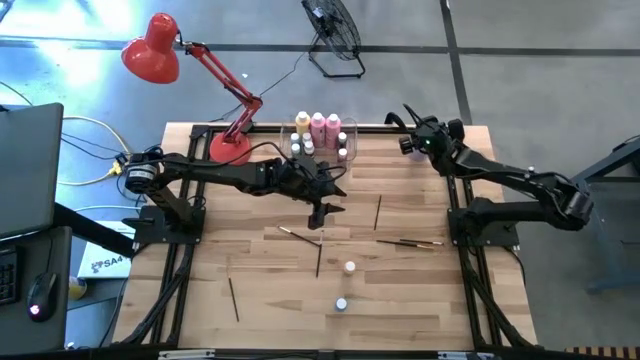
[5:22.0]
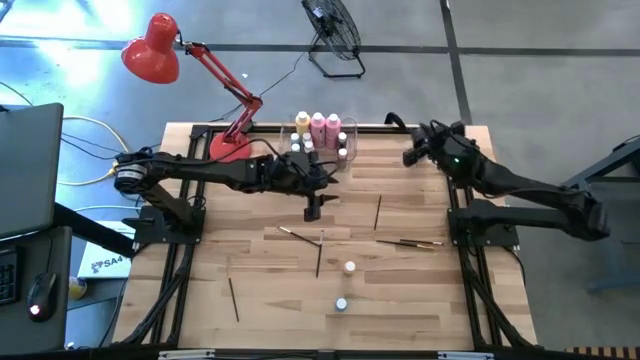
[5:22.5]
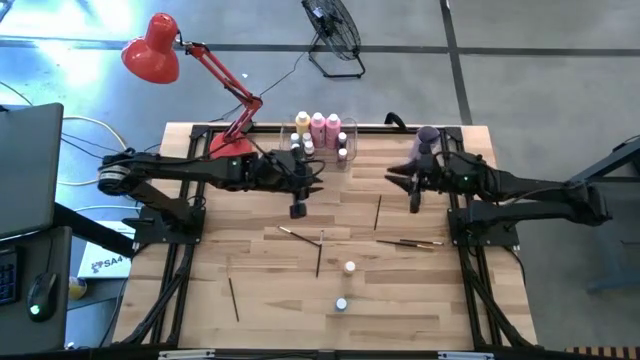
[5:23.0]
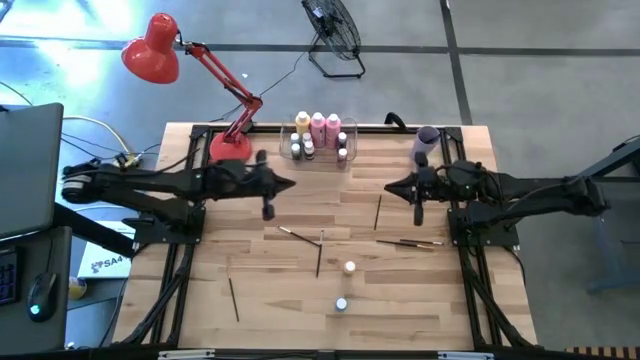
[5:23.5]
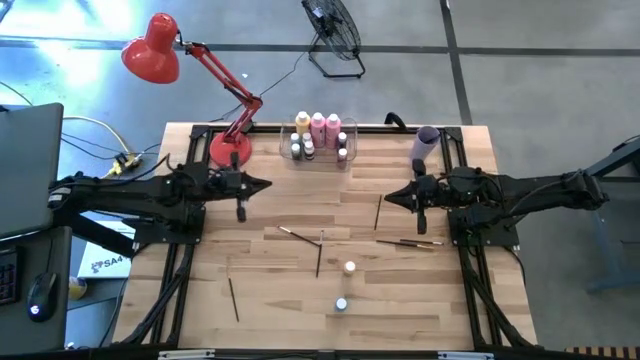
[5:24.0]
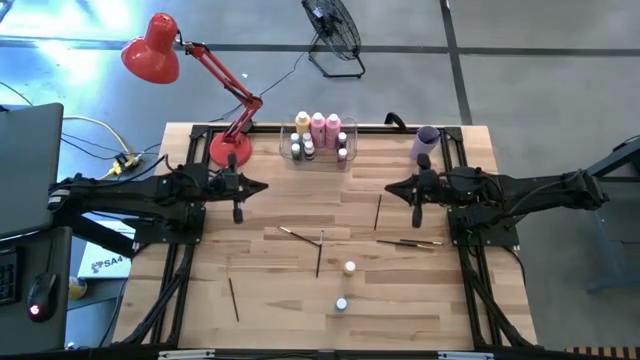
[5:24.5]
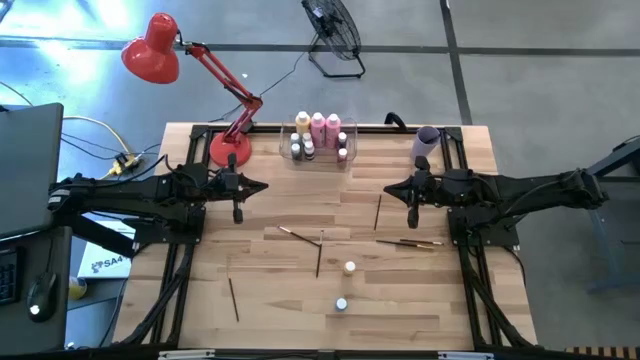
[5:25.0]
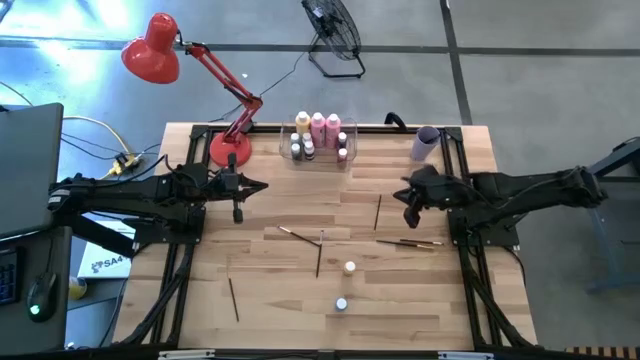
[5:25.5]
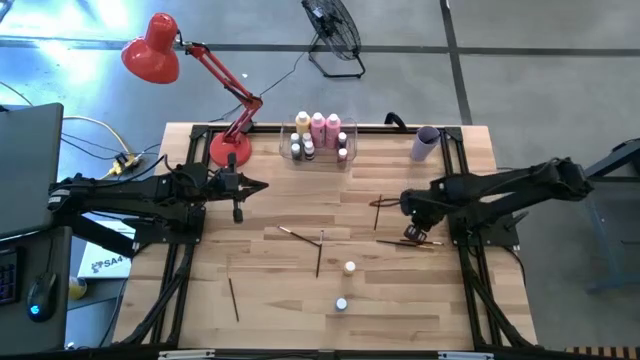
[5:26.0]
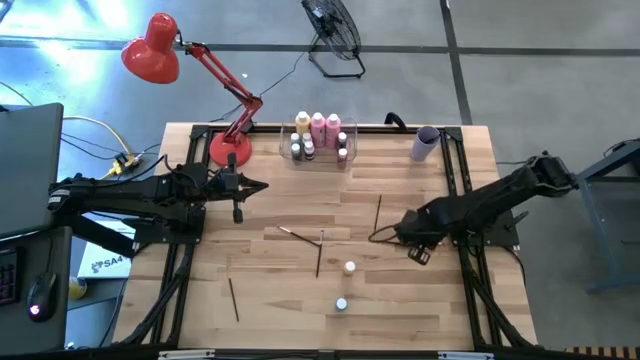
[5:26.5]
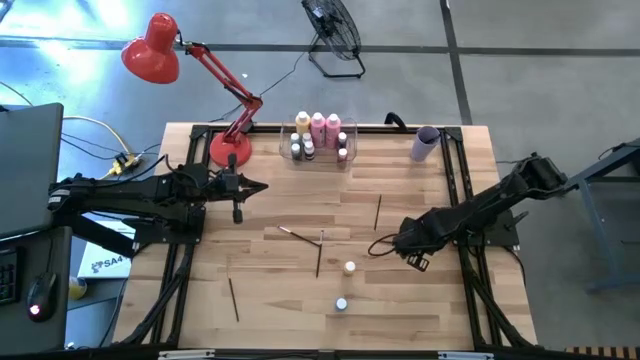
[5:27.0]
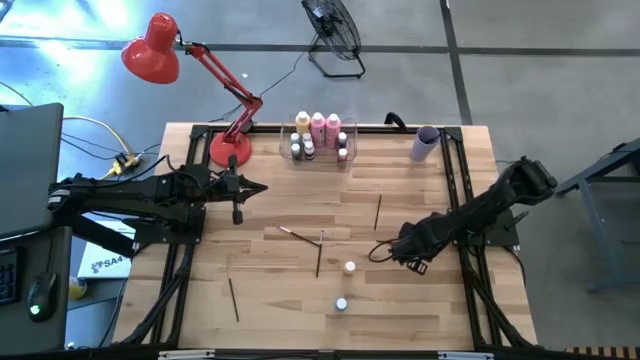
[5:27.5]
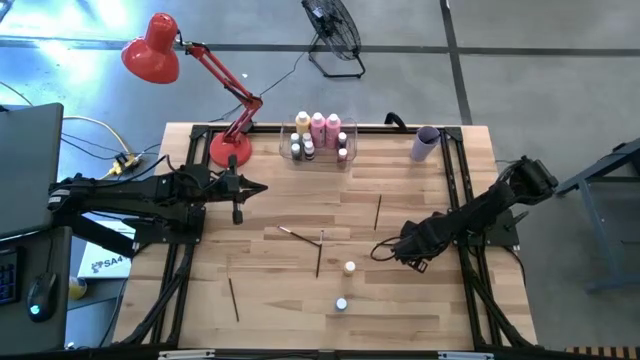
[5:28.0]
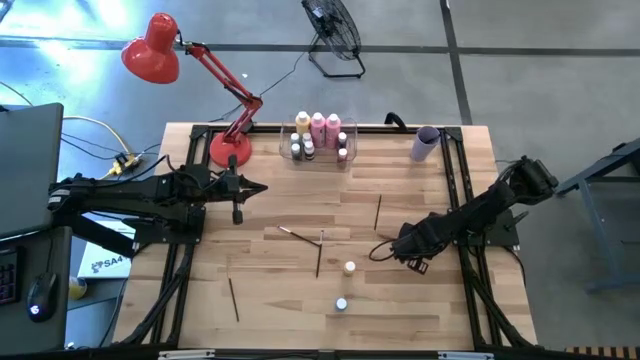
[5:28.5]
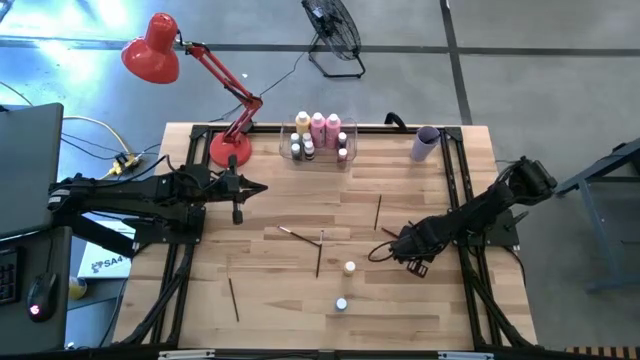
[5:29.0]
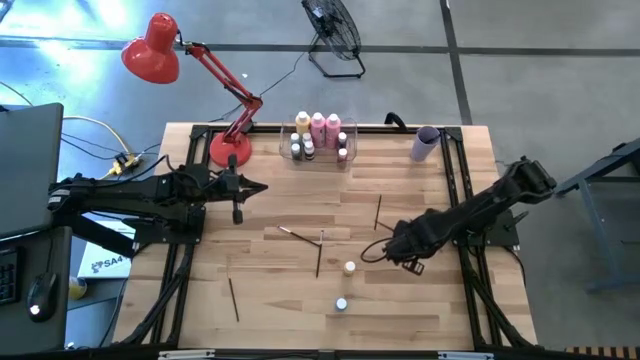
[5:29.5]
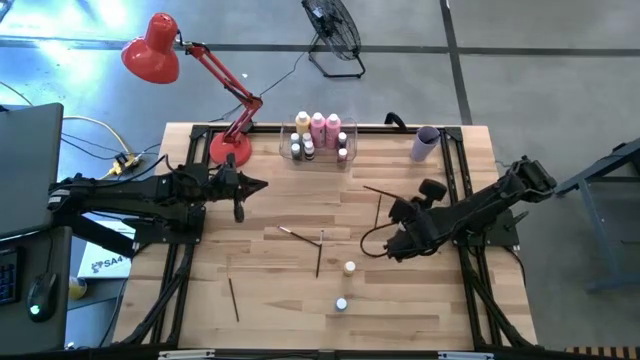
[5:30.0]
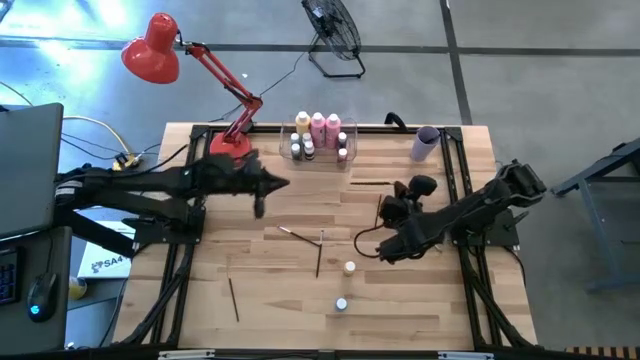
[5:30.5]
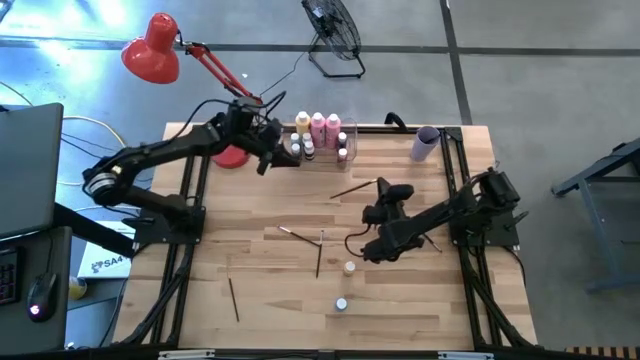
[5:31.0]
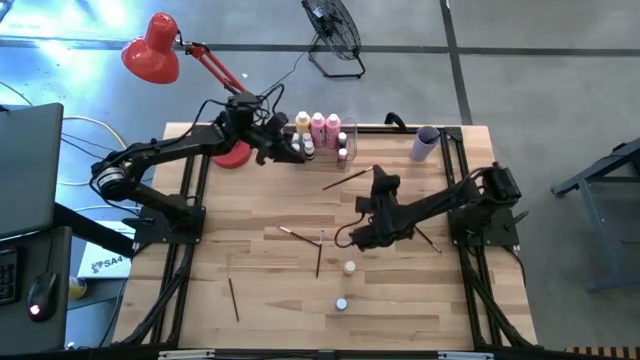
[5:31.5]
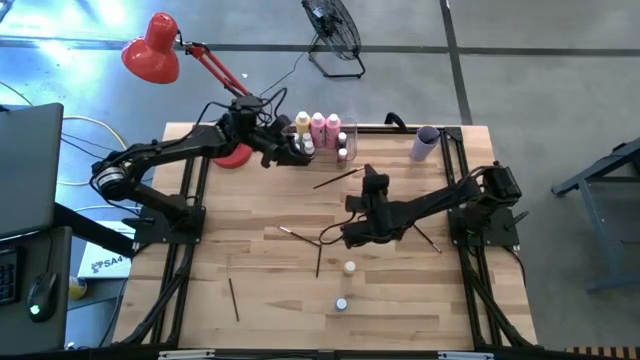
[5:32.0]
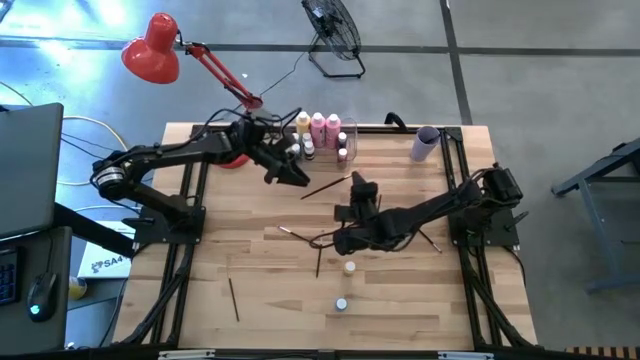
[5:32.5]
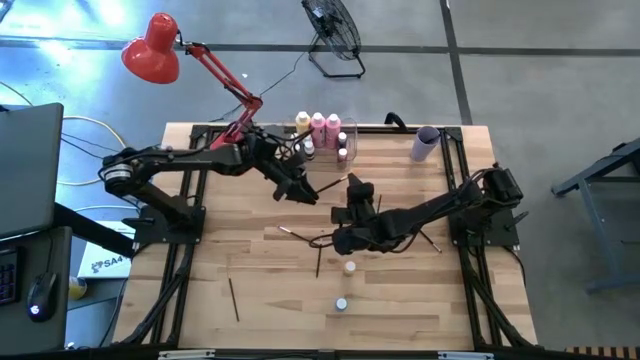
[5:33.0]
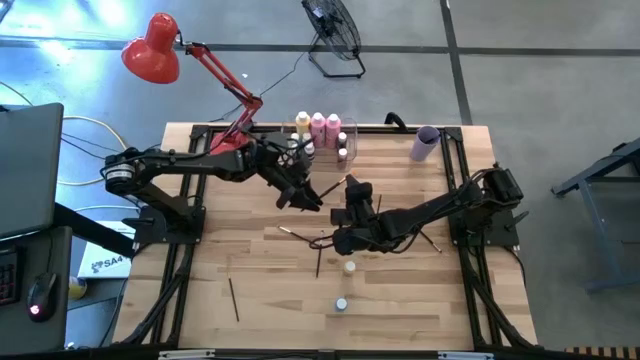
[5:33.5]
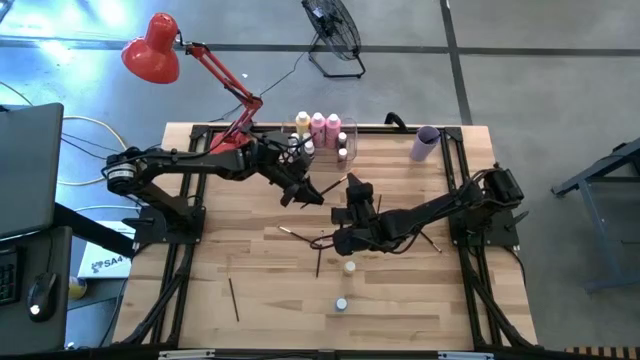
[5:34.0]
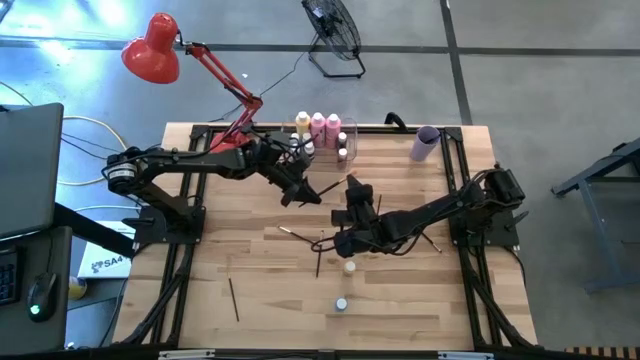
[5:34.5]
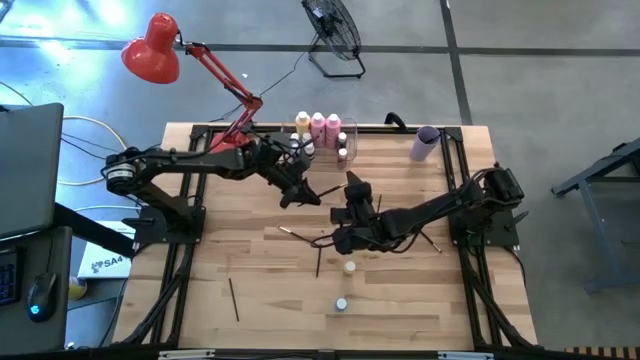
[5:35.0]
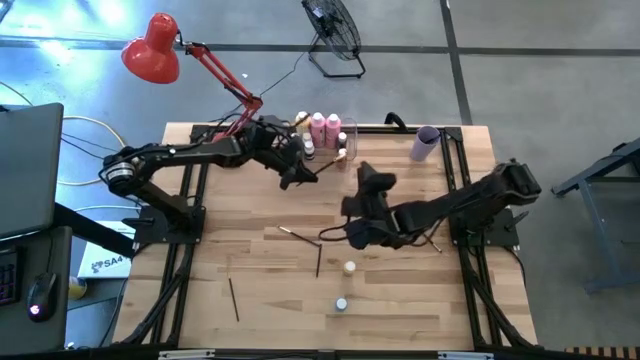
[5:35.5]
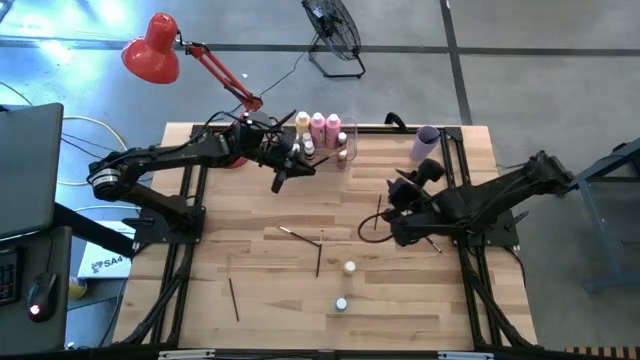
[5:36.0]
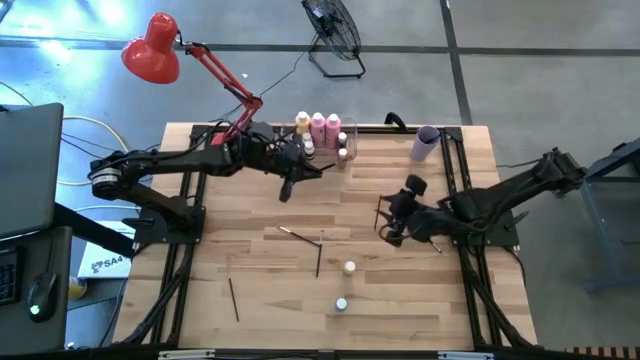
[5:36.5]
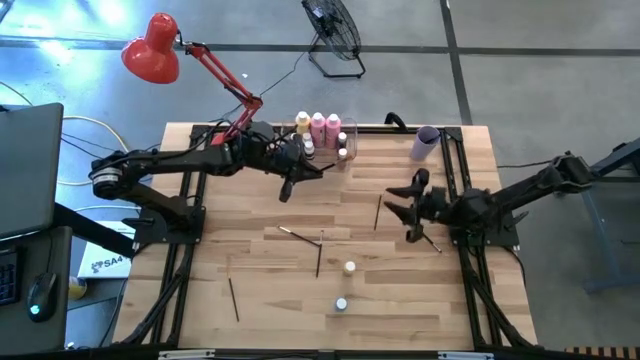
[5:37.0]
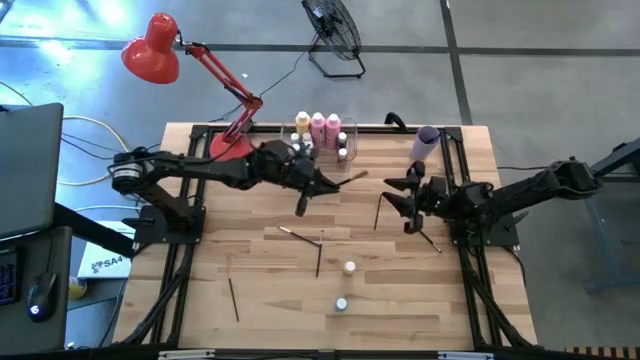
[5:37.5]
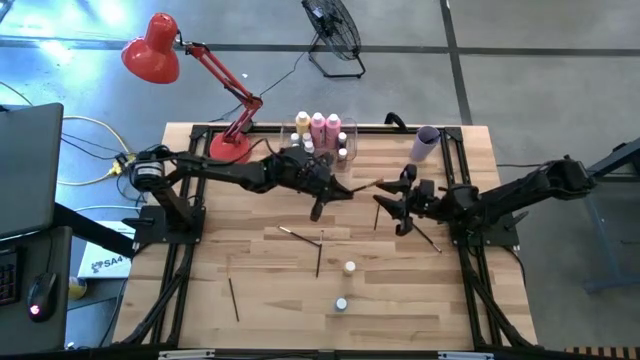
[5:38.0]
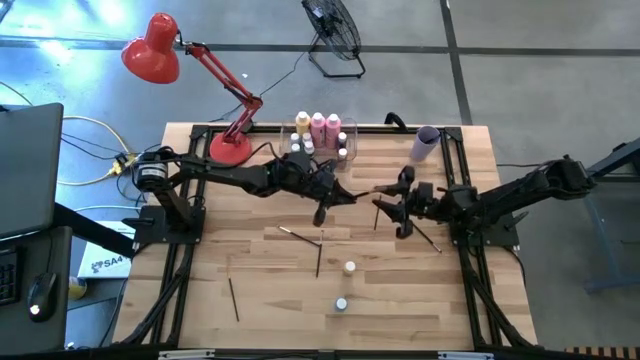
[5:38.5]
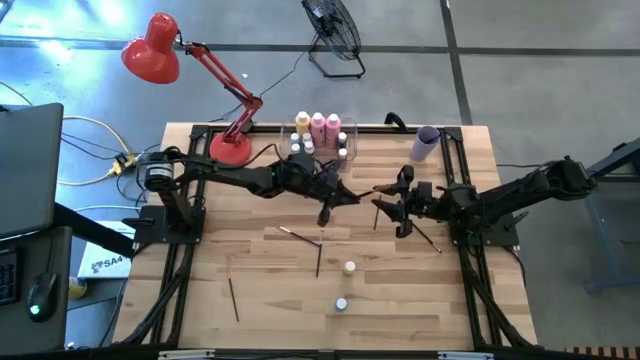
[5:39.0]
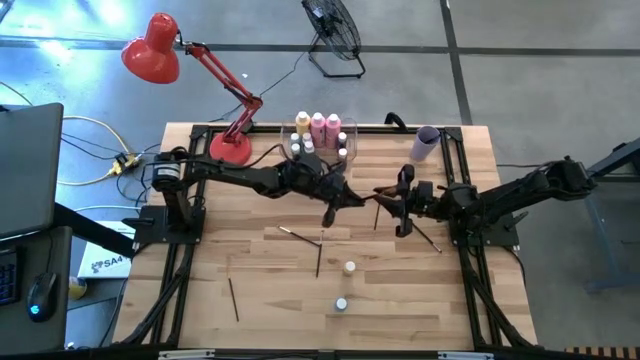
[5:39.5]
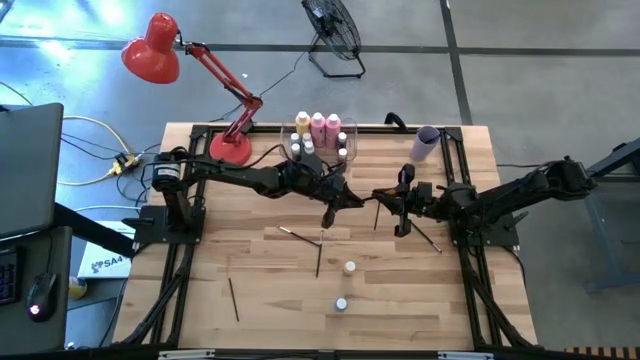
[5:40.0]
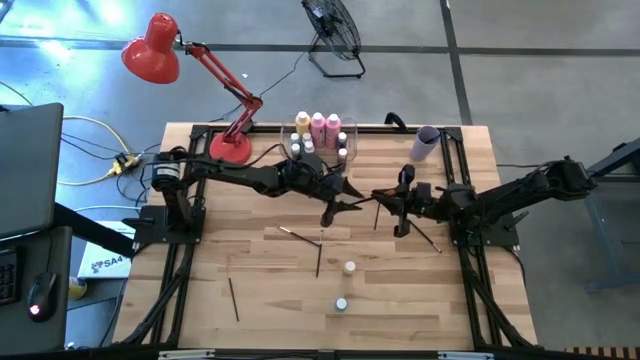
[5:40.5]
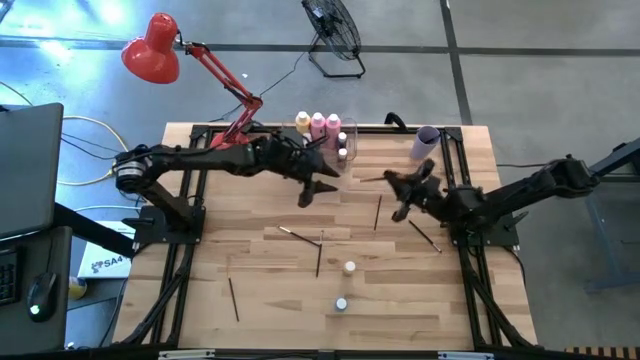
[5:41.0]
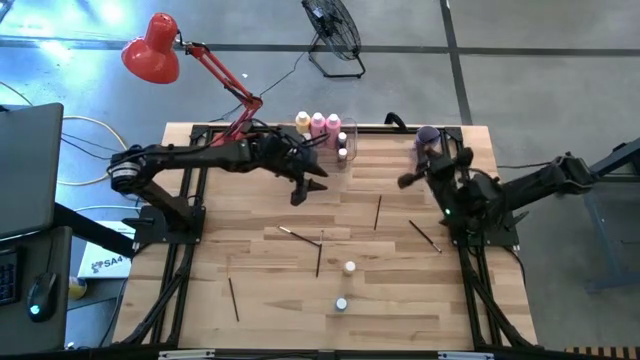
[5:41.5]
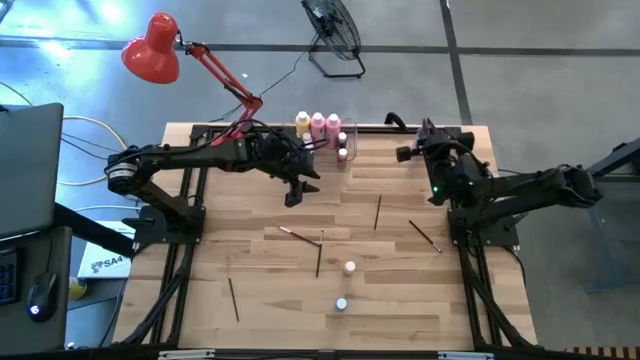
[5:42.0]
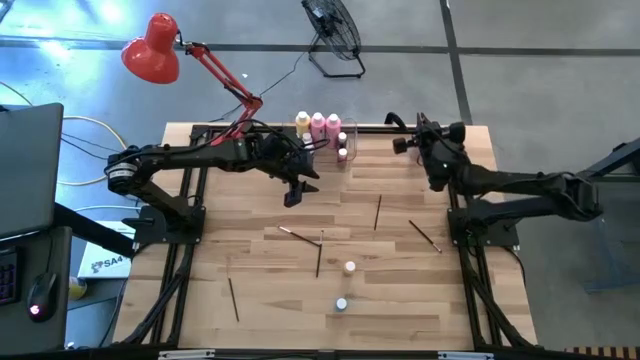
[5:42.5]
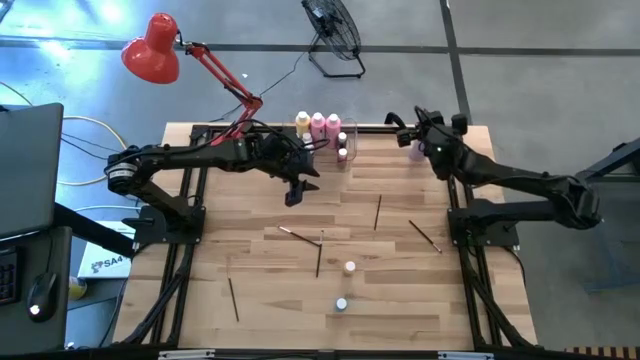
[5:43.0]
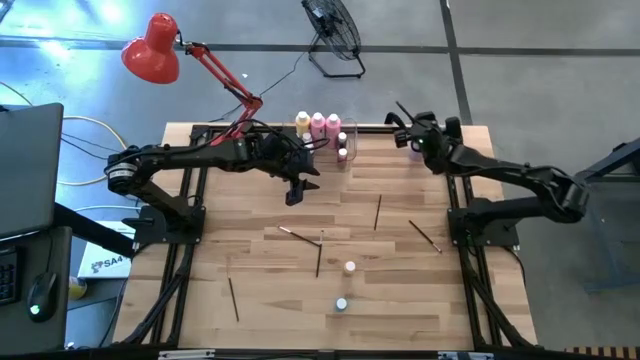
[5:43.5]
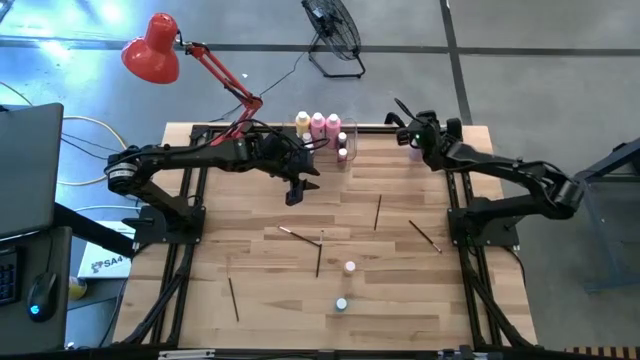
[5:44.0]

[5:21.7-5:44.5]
Task: Pick & Place Paint Supplies
Put the black paint brush into the violet cup
